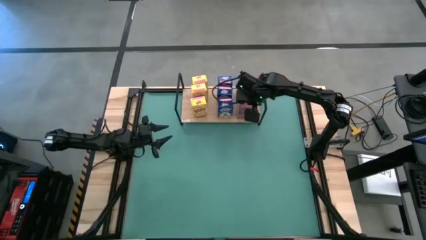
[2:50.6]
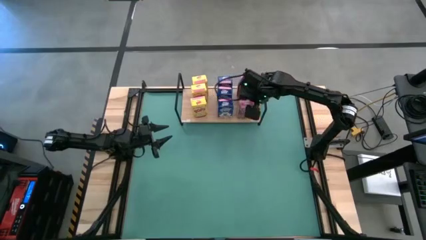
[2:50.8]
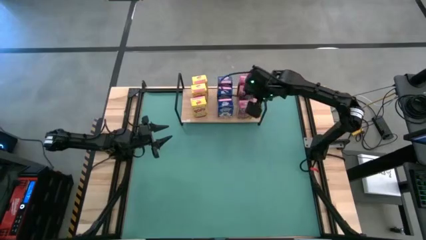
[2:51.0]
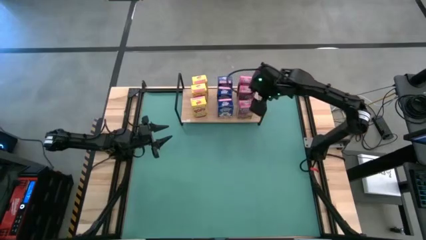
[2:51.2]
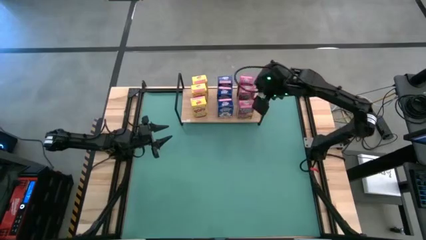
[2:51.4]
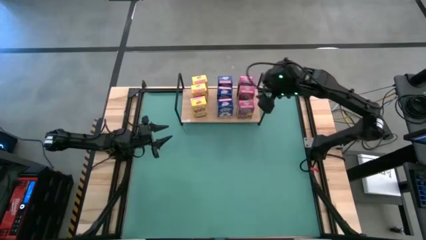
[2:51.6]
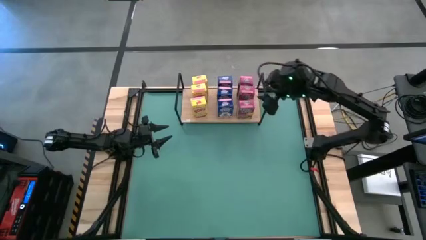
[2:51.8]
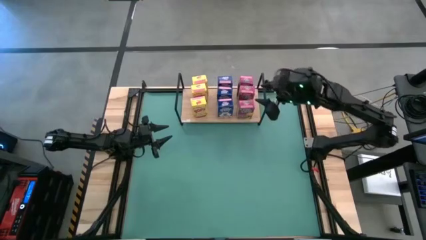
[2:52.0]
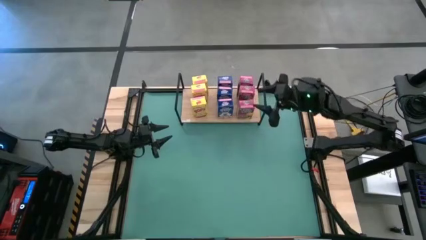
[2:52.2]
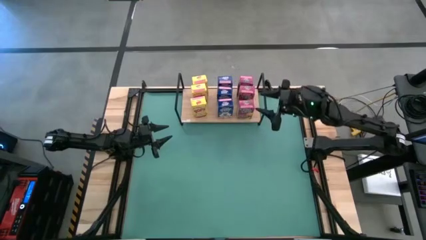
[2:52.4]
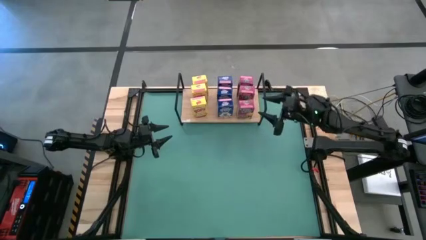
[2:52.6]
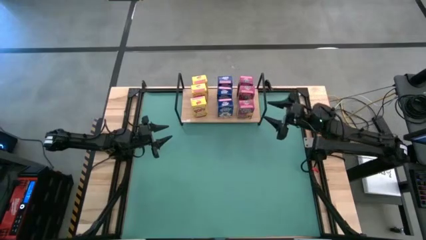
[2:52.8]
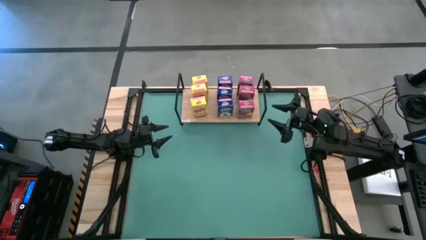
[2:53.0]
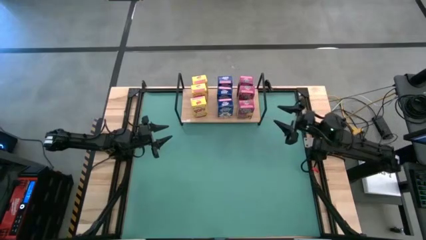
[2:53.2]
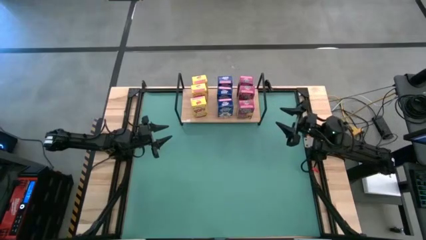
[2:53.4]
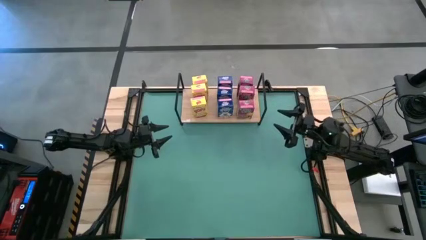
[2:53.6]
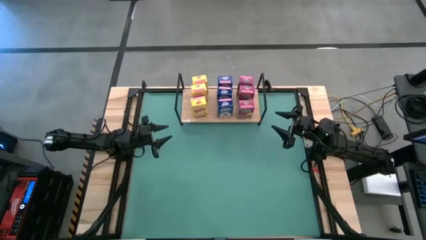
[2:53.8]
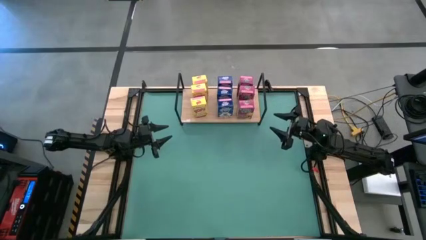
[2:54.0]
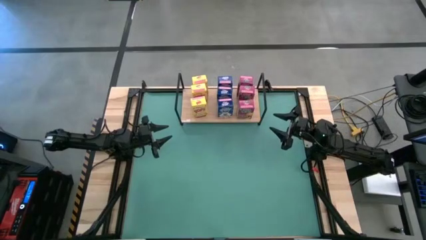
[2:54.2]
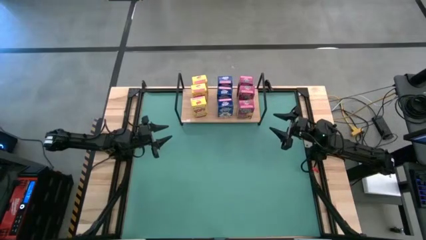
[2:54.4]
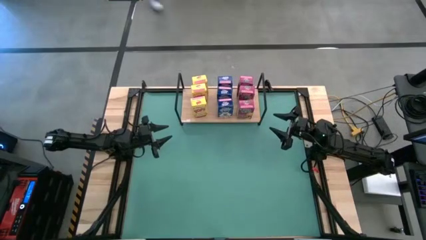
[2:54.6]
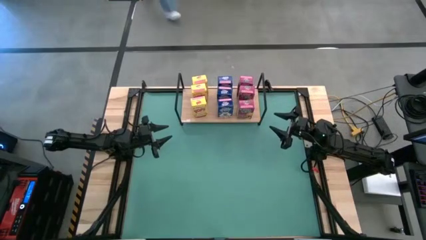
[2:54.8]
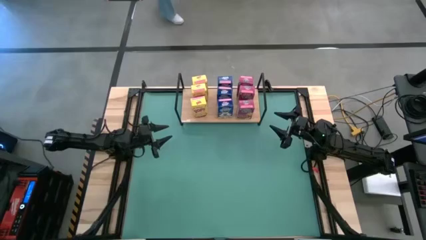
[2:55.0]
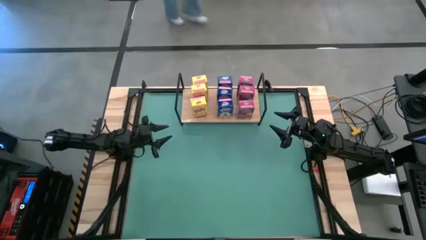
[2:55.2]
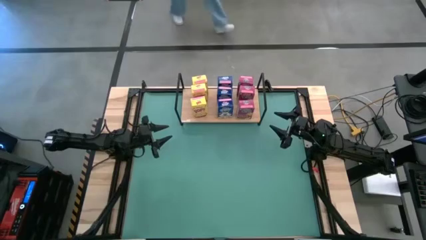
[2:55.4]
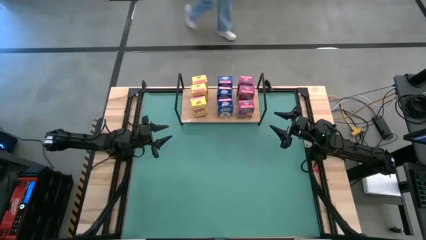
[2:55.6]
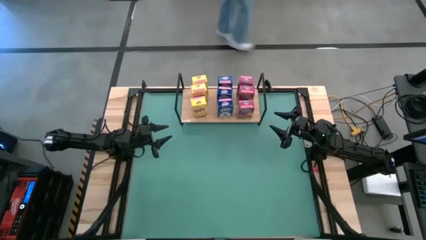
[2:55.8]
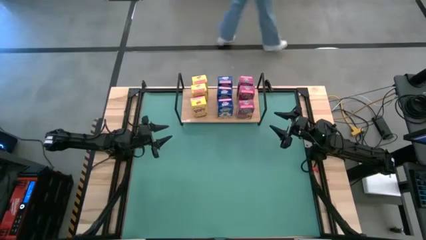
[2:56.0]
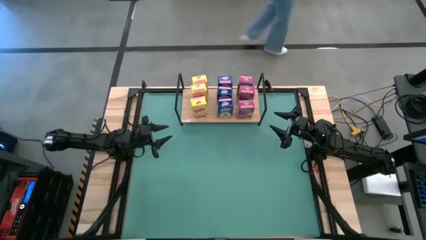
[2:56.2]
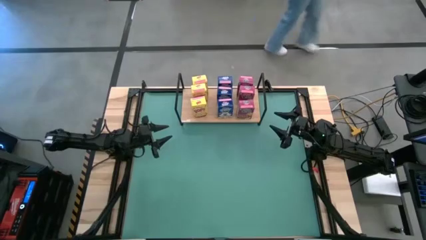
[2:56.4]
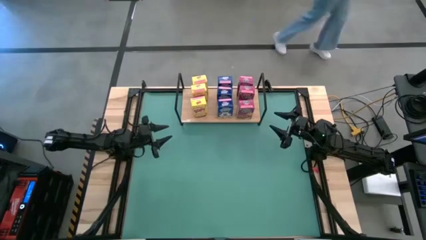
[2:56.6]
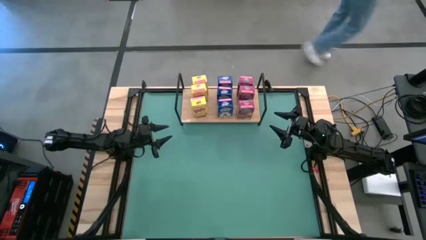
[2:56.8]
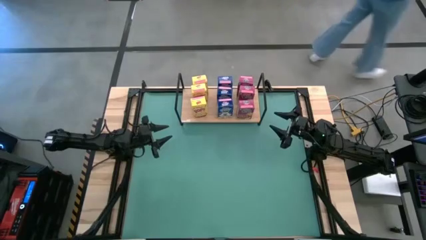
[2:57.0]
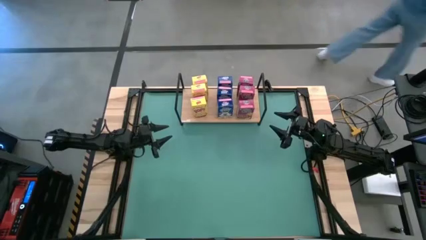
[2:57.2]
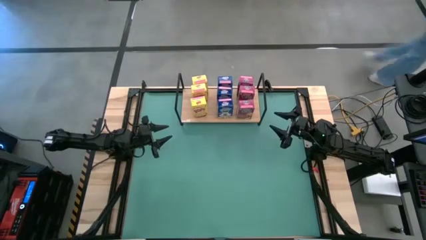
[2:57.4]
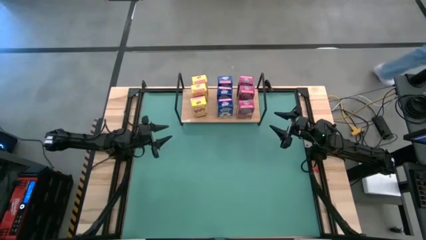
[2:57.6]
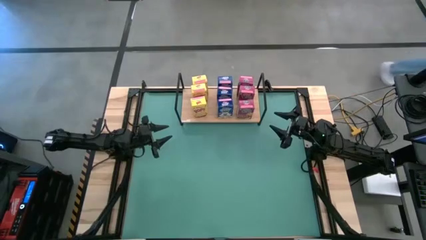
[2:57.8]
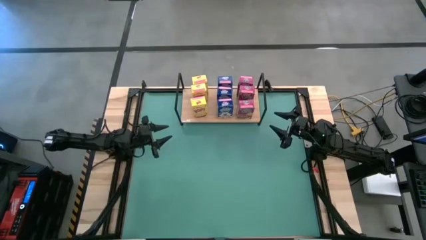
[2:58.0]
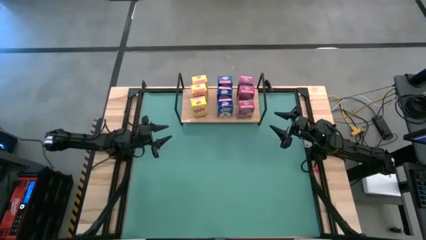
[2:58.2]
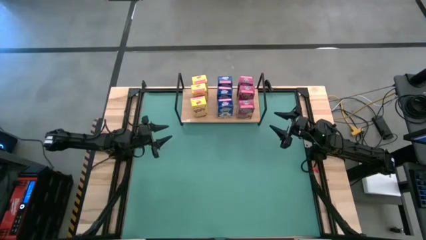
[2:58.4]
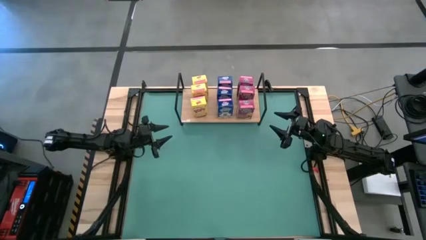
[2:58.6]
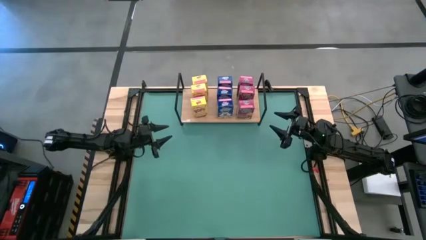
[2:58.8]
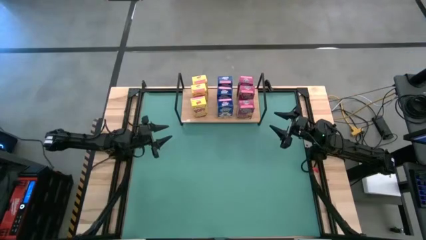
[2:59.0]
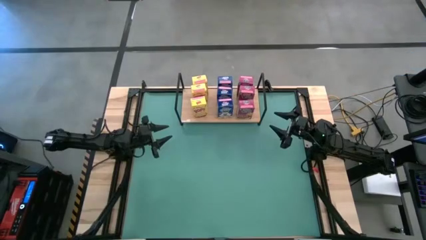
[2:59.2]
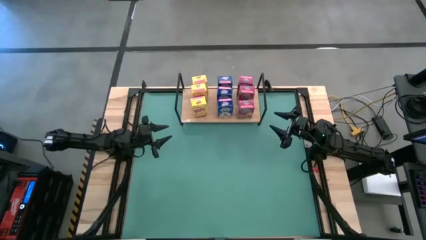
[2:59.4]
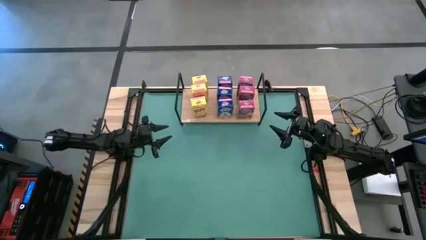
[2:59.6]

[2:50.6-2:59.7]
Task: Stack cereal on shelf
Return to Home Position

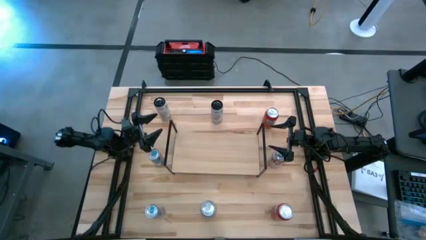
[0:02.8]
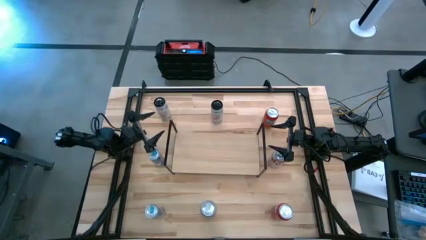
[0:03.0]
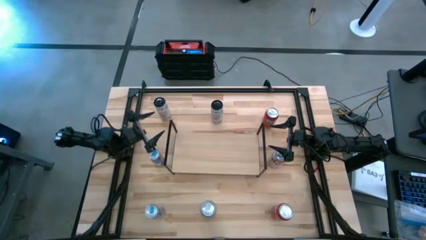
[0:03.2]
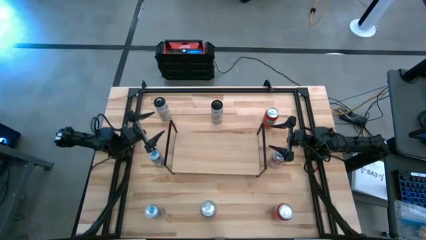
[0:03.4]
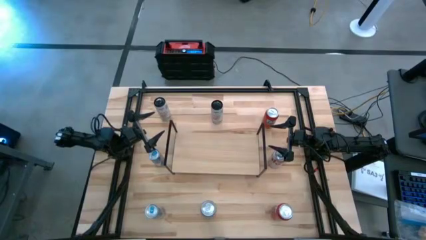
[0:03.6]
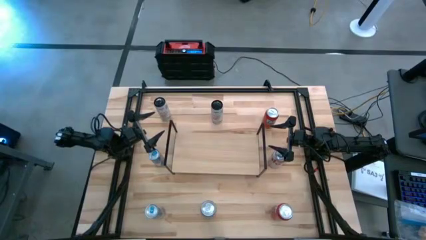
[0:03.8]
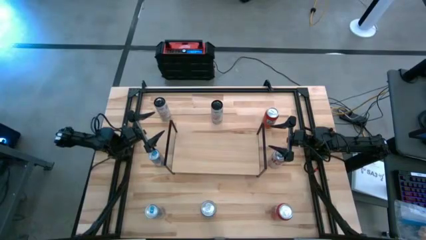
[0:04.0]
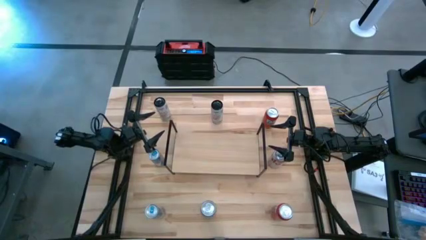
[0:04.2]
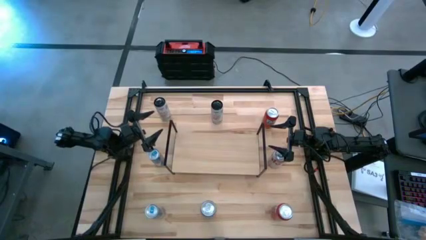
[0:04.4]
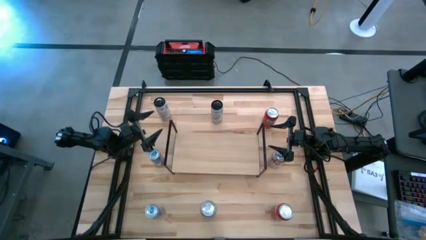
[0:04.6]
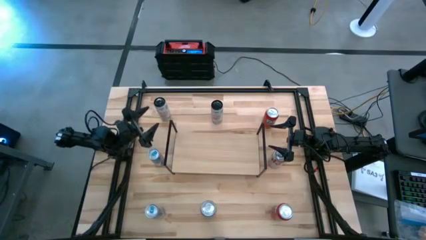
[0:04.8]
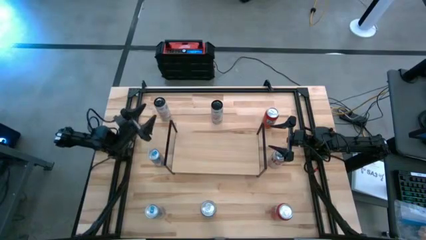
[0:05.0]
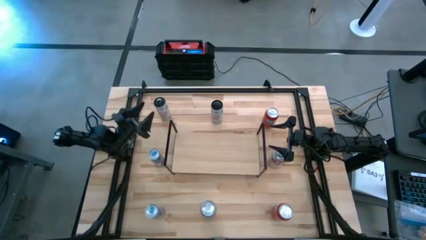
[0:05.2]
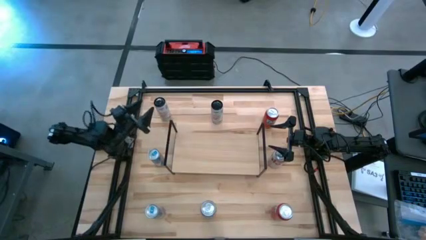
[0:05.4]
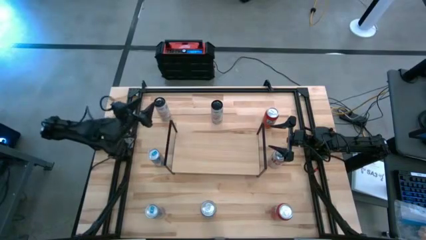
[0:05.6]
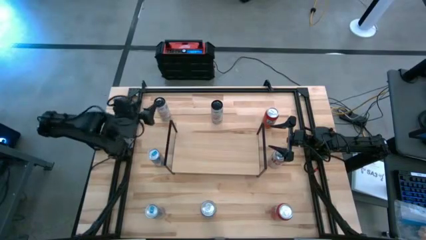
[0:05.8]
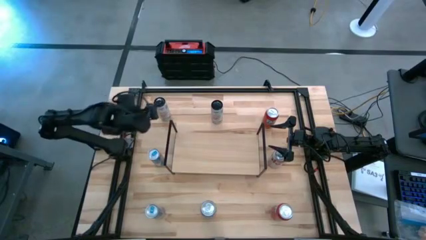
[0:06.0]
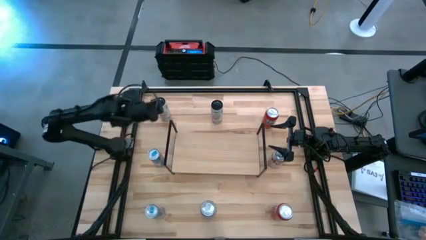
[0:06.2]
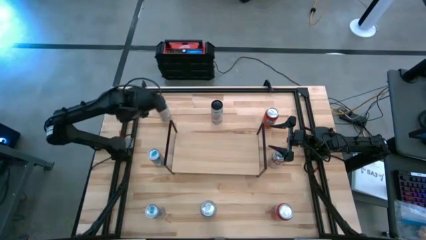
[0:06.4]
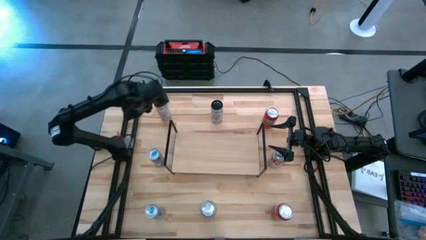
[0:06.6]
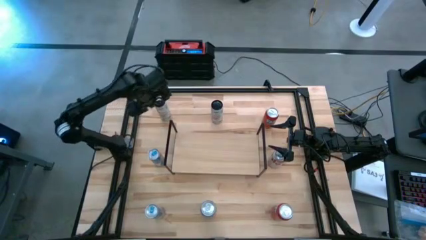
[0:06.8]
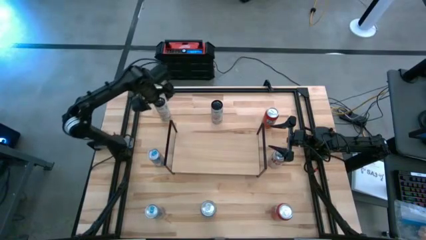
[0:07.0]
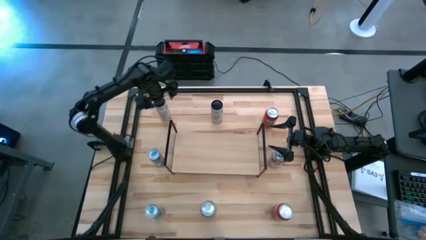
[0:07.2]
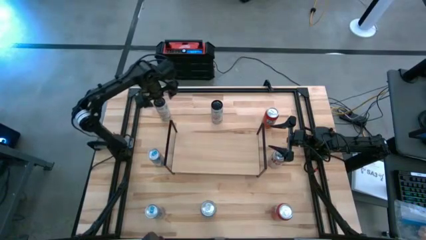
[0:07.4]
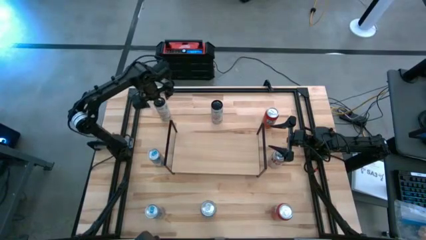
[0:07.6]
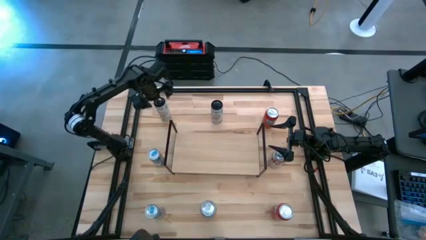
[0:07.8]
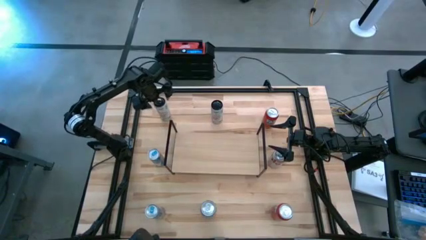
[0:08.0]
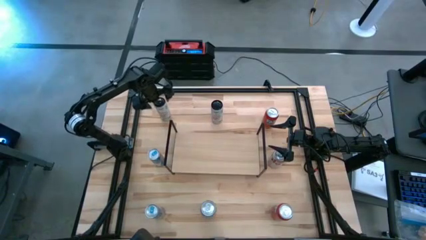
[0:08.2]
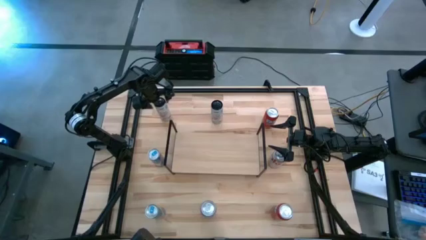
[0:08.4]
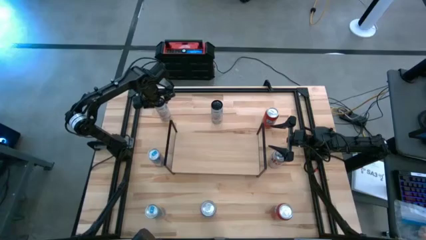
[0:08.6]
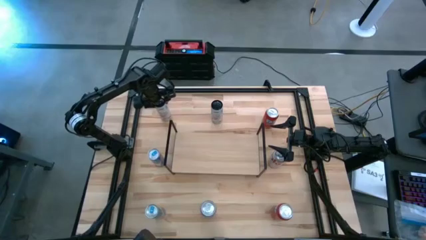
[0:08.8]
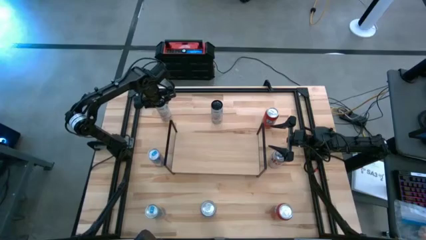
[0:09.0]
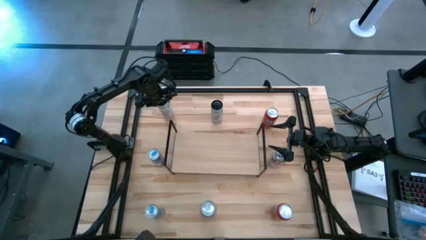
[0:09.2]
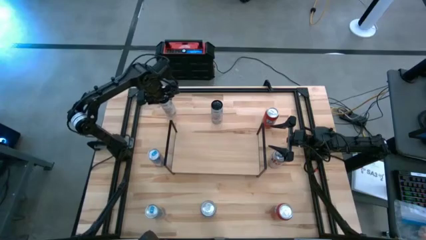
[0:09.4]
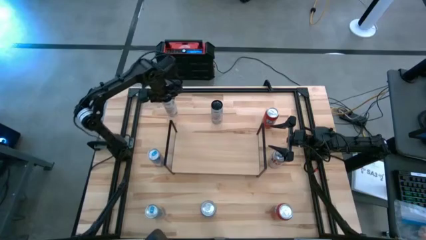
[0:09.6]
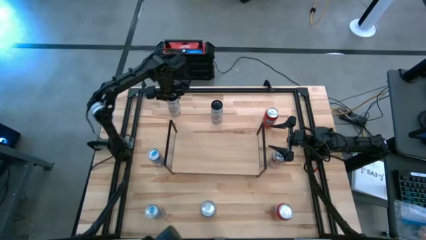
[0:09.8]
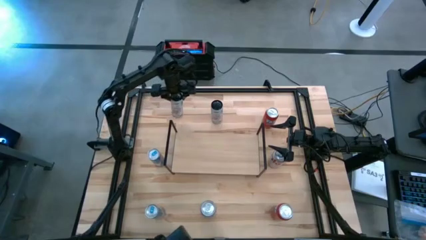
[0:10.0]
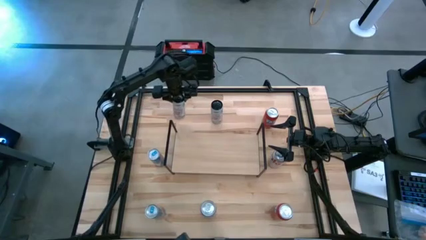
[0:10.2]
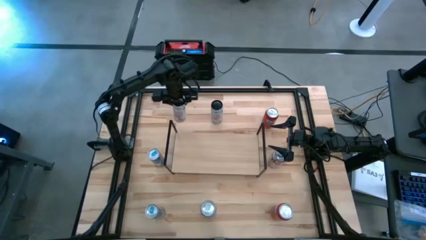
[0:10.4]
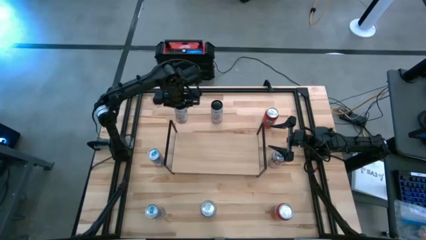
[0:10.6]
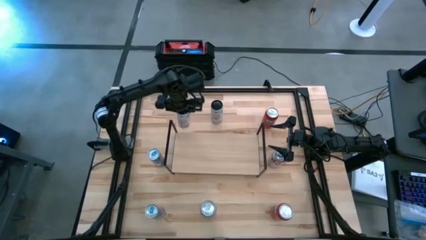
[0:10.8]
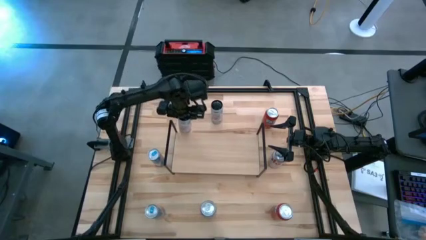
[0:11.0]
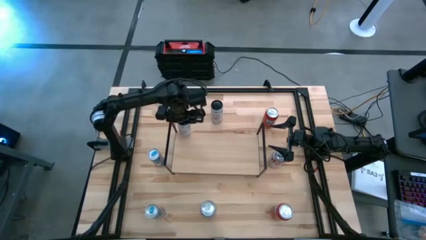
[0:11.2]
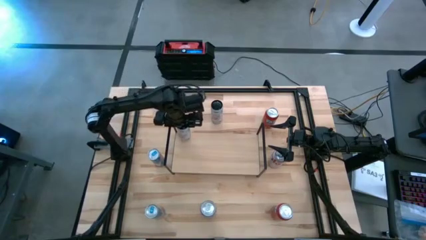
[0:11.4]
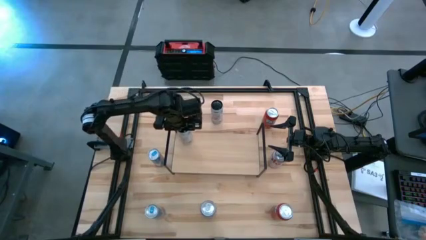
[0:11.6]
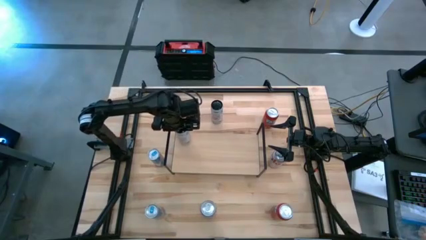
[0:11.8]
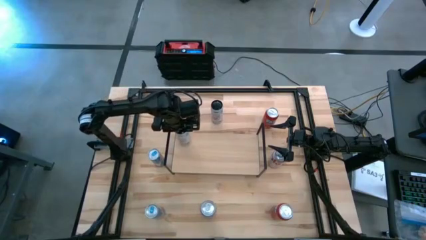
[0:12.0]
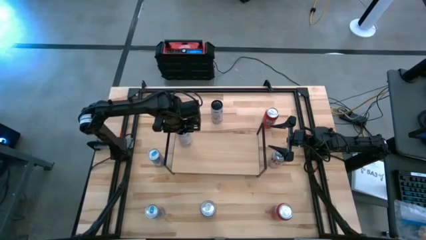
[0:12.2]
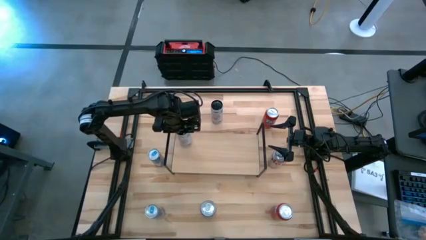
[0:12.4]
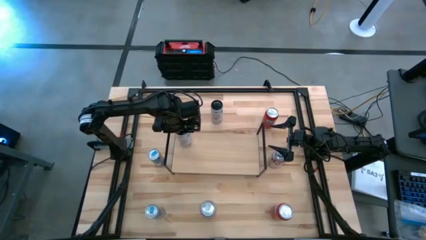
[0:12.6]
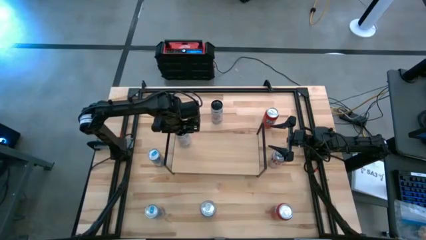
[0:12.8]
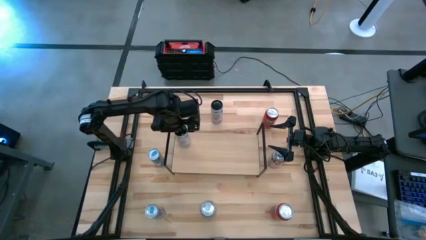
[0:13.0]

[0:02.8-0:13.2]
Task: Place canned beverage on shelf
Put the left white-pink soda can on the shelf
